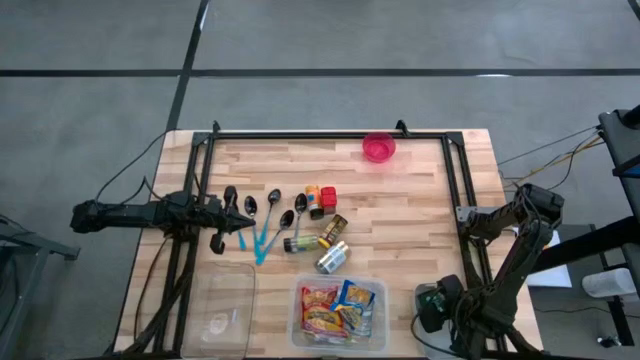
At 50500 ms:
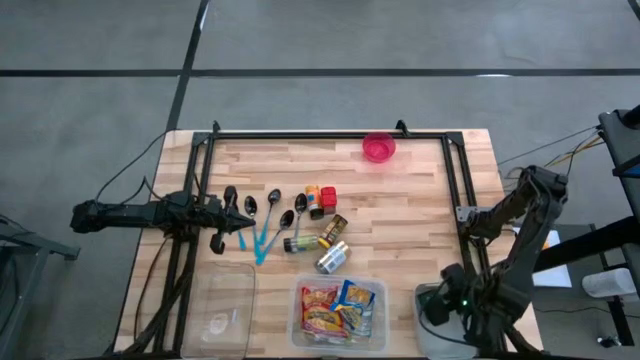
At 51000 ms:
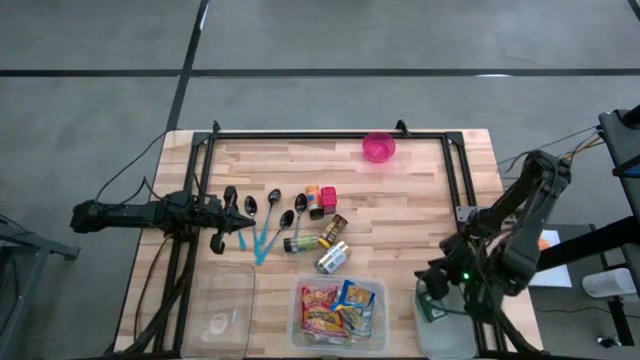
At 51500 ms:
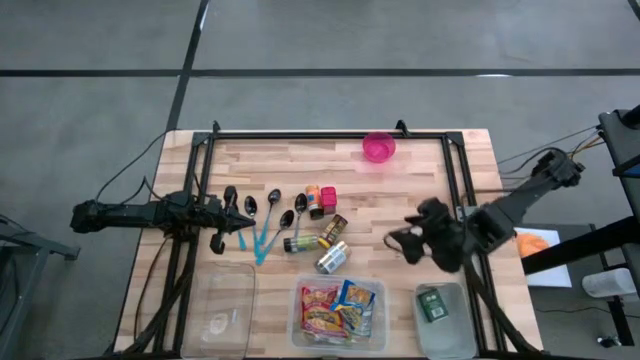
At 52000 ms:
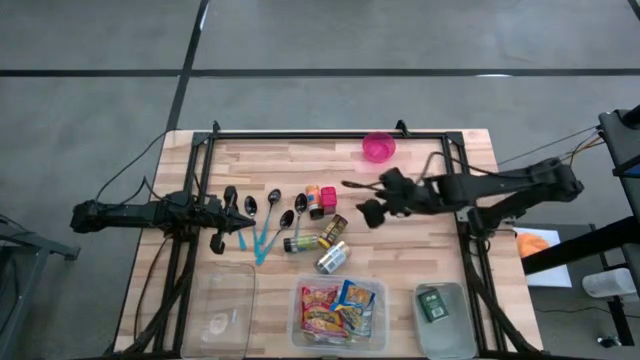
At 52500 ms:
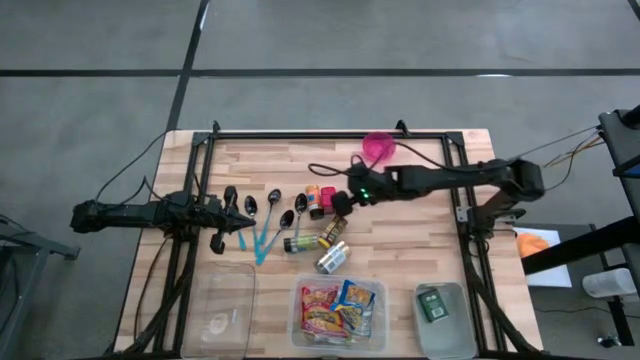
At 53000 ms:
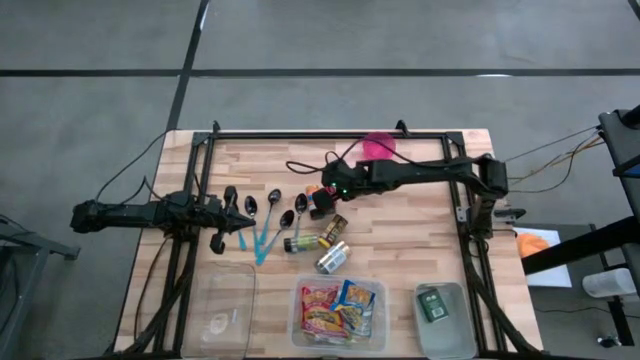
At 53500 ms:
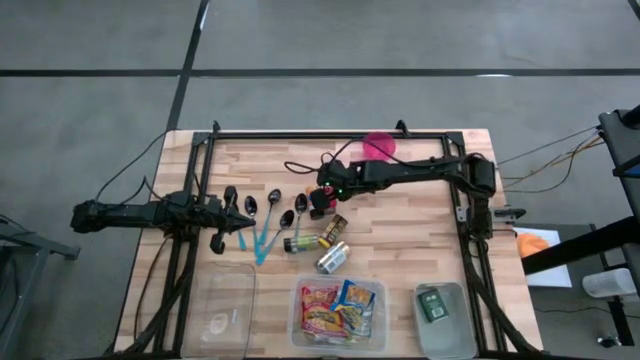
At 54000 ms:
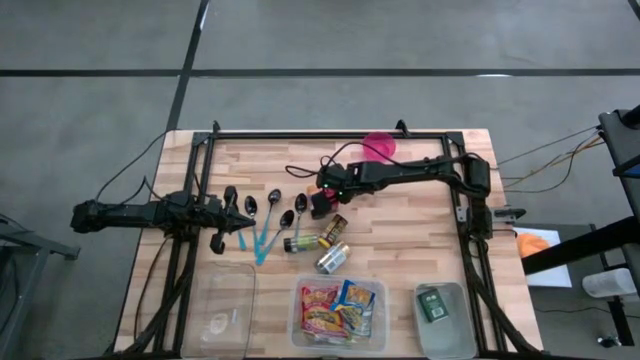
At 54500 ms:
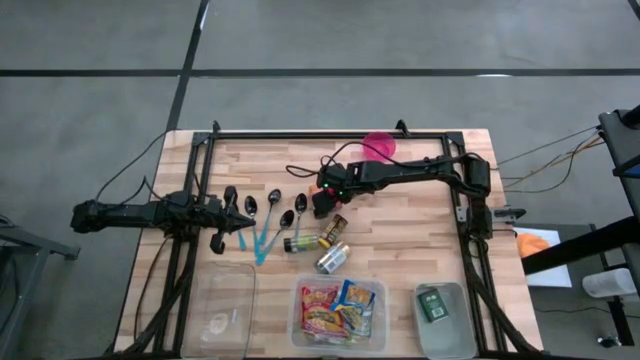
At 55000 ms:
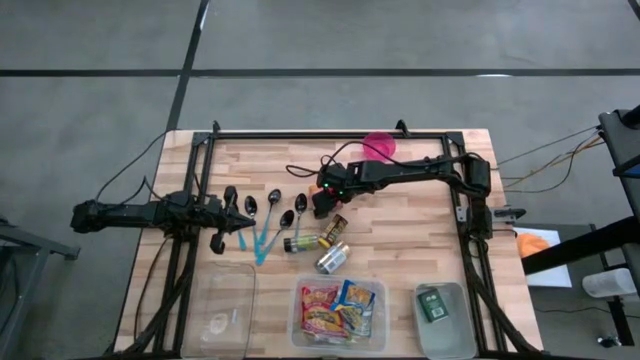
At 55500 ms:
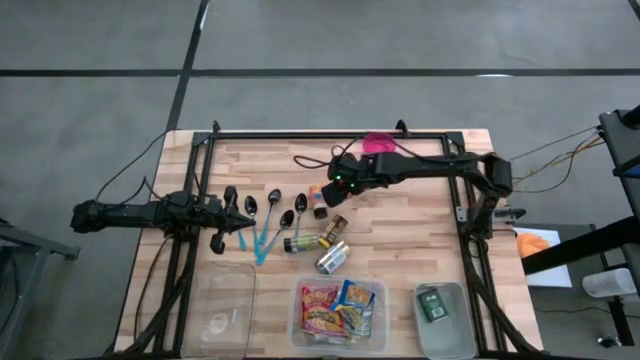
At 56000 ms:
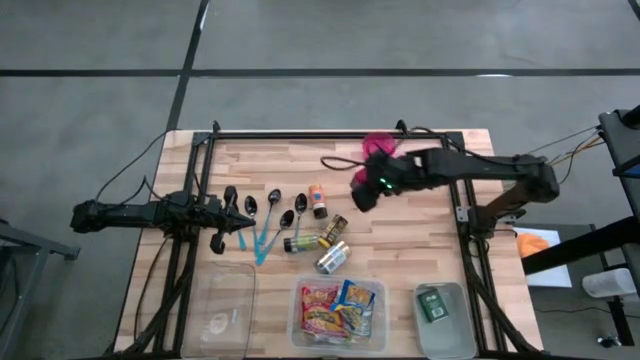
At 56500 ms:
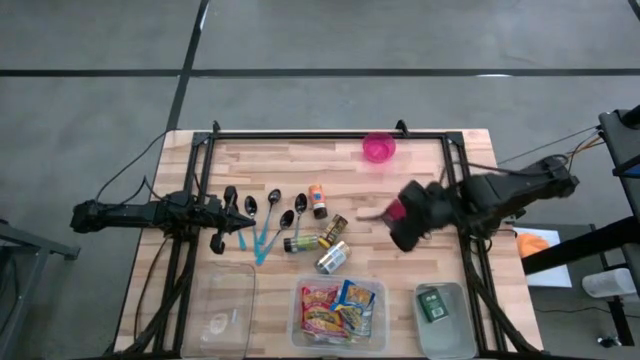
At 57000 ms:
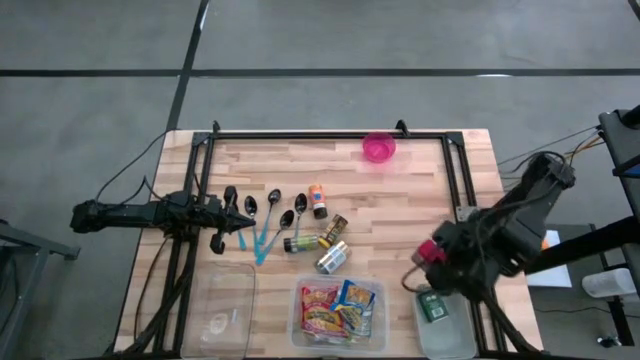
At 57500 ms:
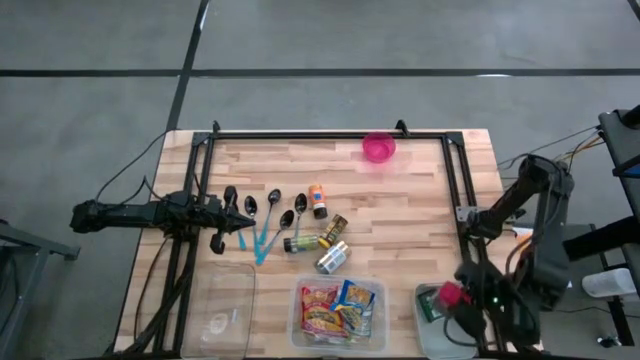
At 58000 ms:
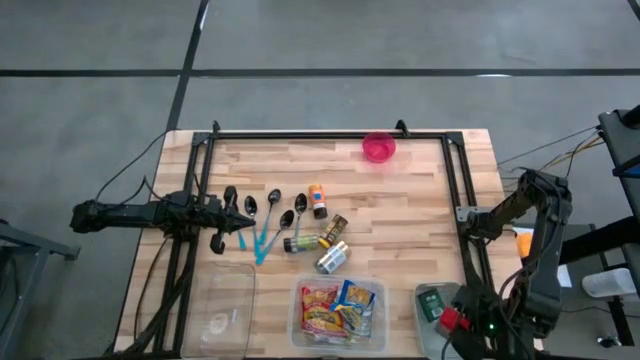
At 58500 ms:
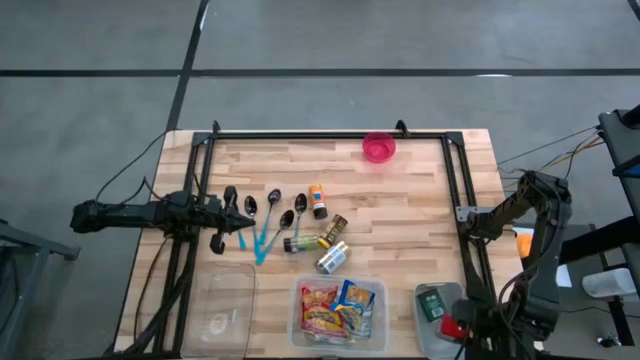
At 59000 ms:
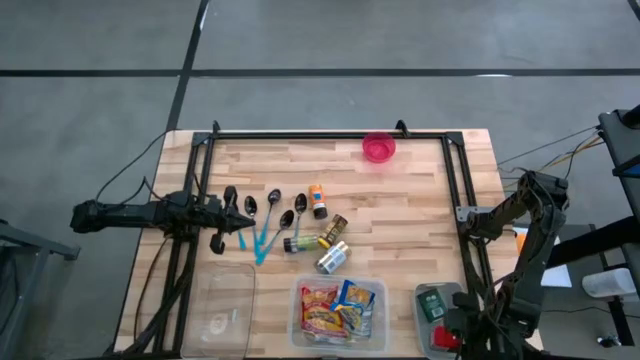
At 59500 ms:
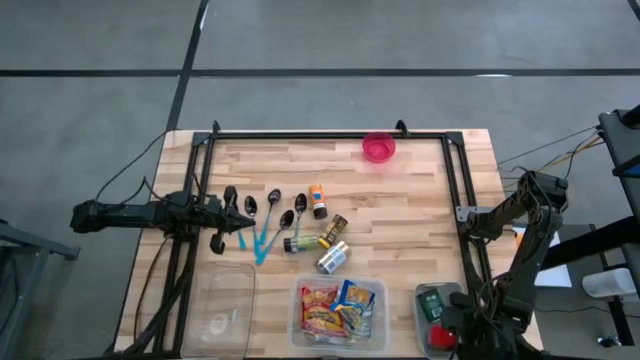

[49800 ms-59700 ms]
Put the red seasoning can into the gray bin

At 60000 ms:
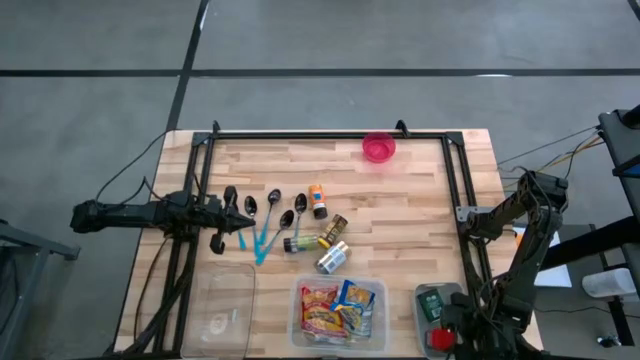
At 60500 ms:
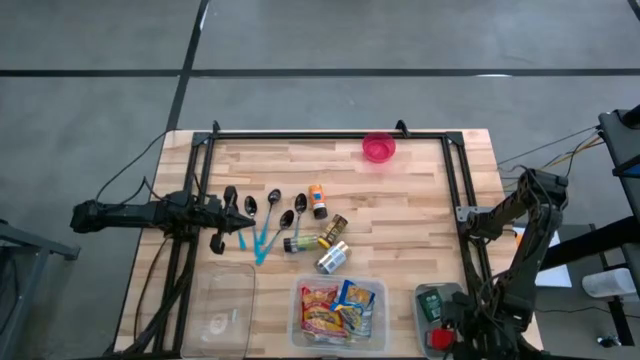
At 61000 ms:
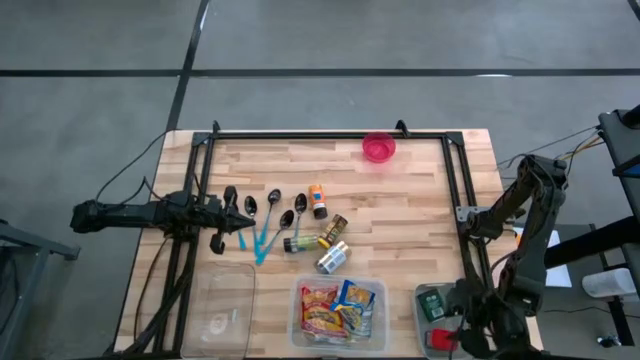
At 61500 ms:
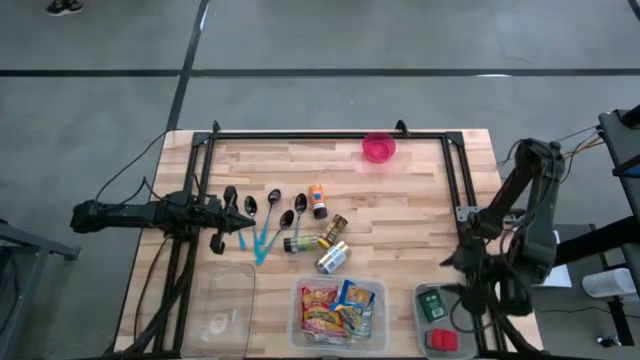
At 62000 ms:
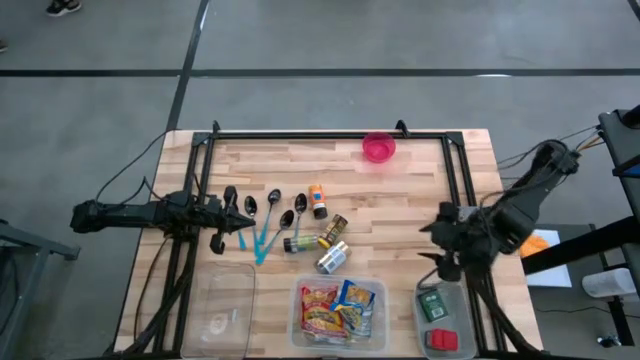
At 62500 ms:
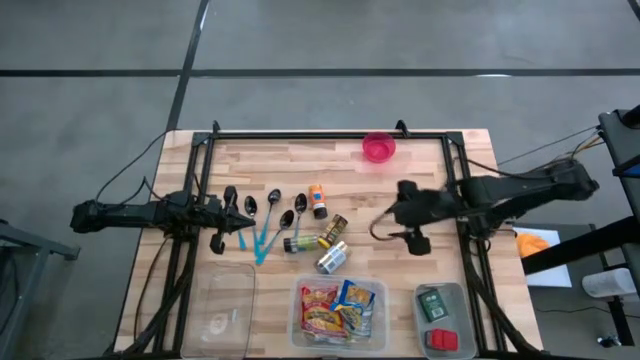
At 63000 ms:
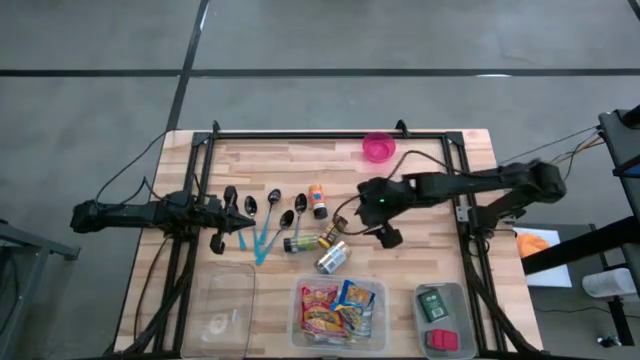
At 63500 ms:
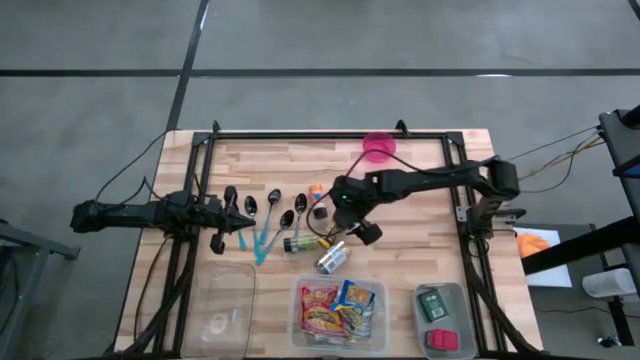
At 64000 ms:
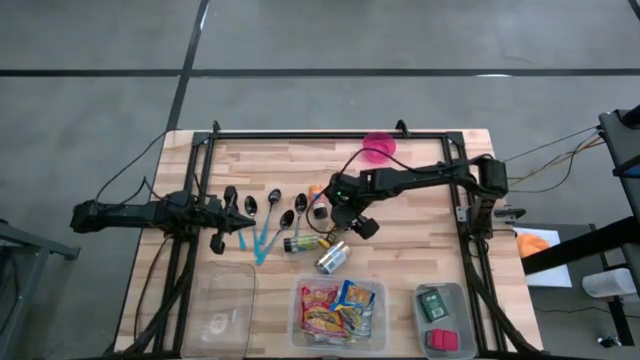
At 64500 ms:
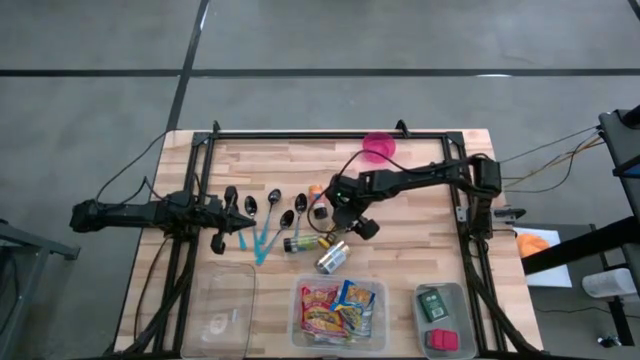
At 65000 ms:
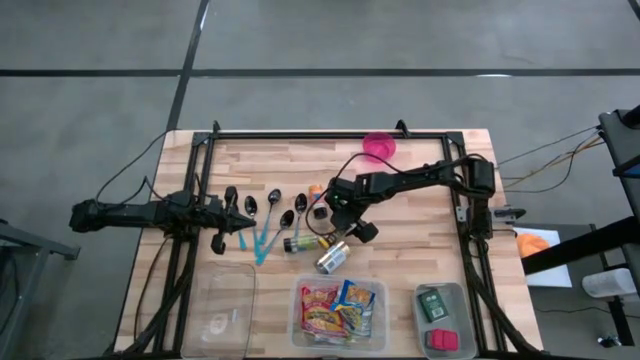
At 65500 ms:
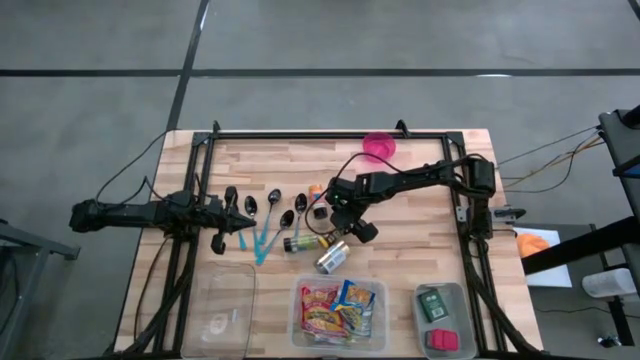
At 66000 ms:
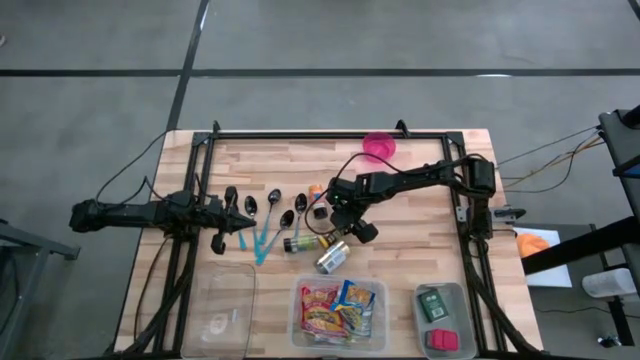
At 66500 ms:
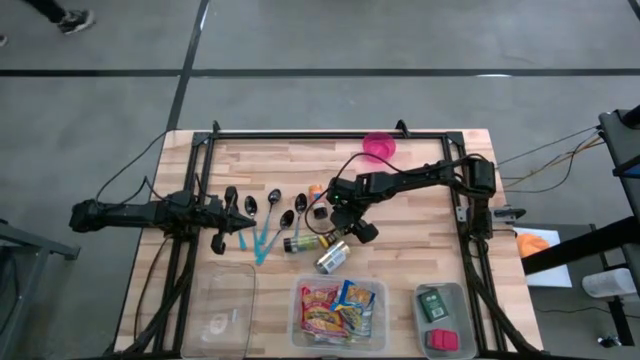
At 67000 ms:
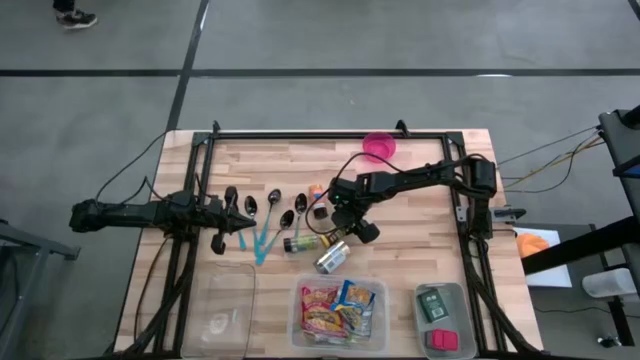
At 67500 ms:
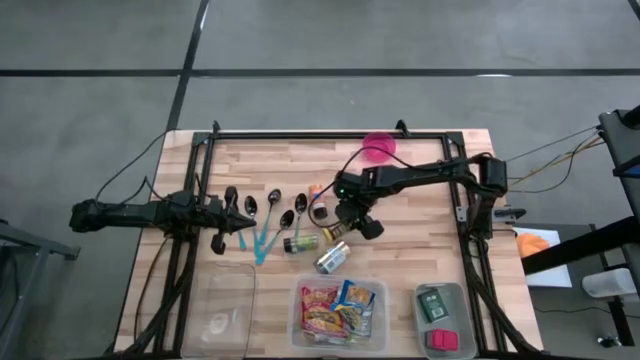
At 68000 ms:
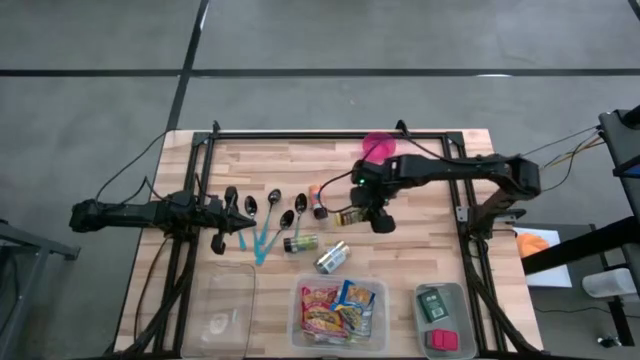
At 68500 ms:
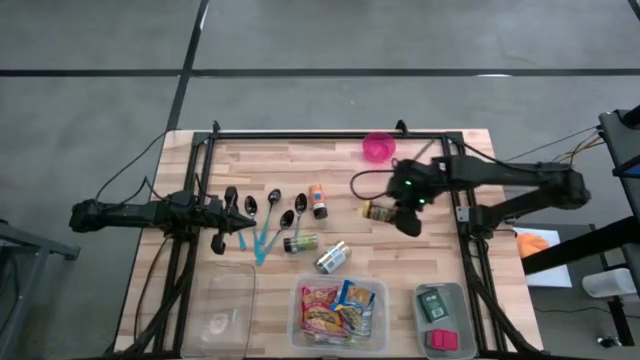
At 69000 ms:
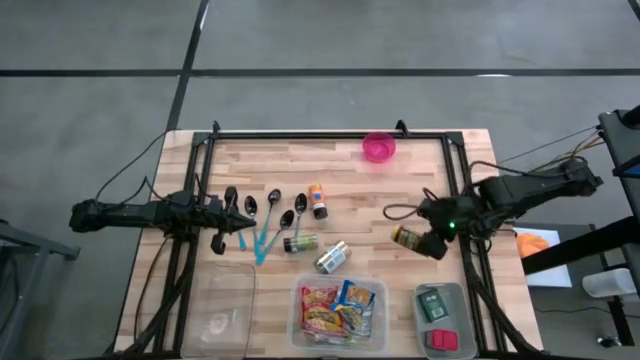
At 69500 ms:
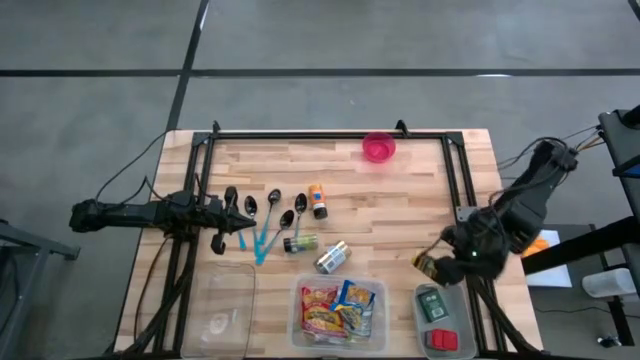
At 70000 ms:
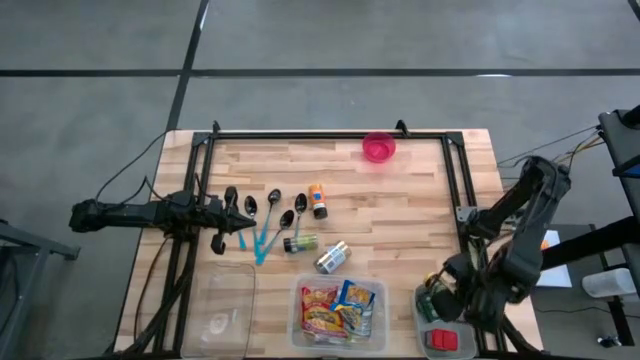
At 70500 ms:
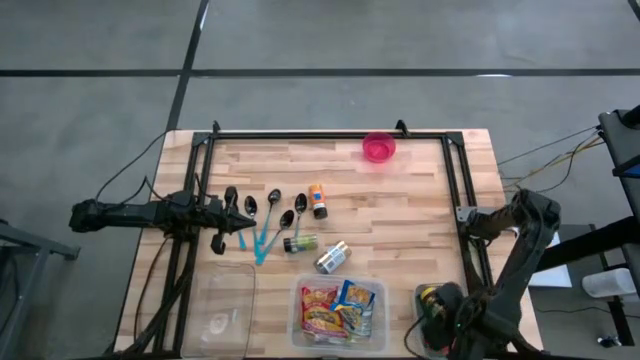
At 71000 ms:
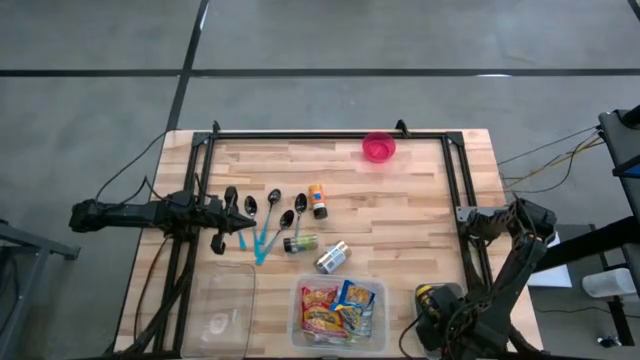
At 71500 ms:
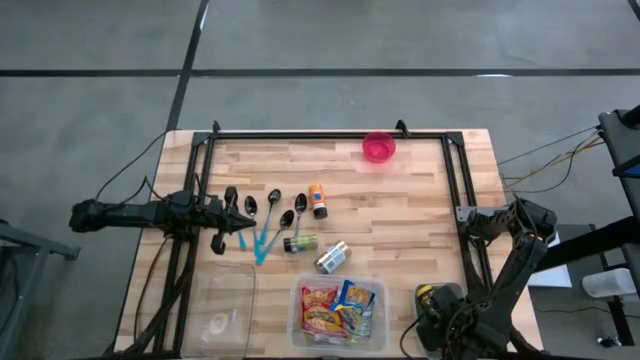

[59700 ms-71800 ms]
Put the yellow seasoning can into the gray bin
